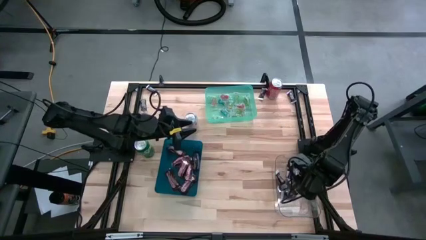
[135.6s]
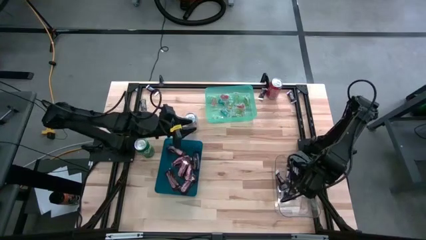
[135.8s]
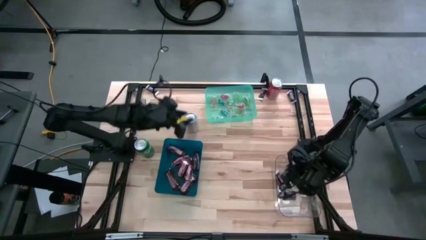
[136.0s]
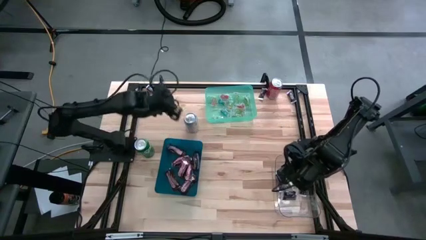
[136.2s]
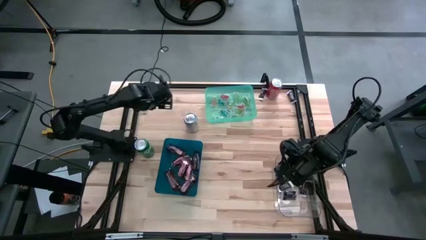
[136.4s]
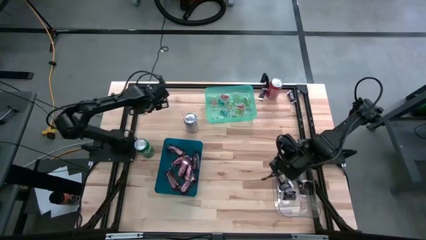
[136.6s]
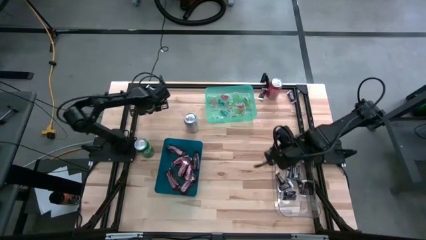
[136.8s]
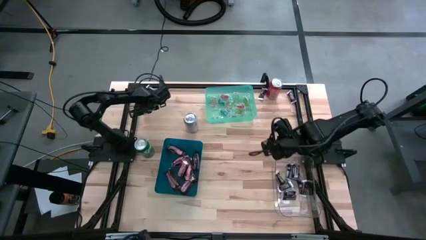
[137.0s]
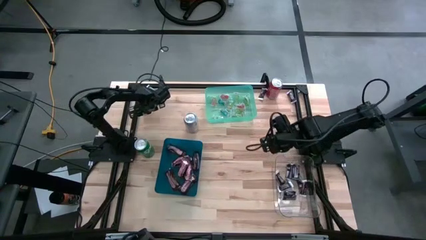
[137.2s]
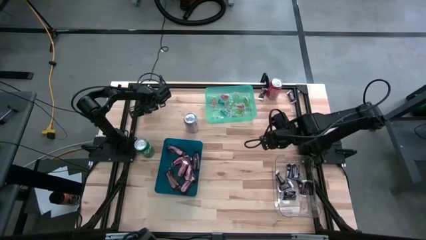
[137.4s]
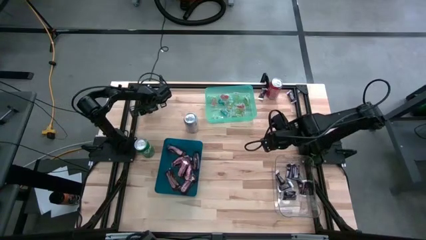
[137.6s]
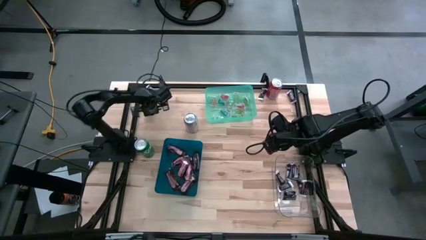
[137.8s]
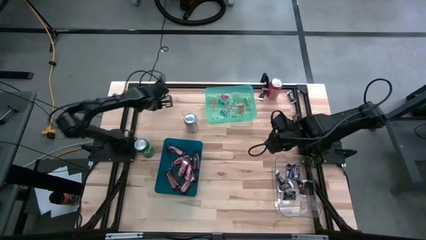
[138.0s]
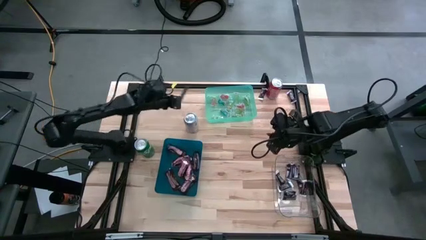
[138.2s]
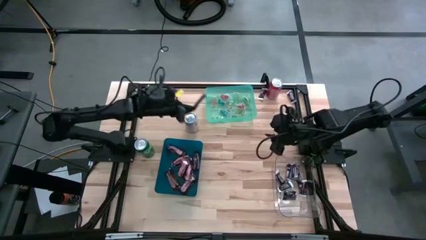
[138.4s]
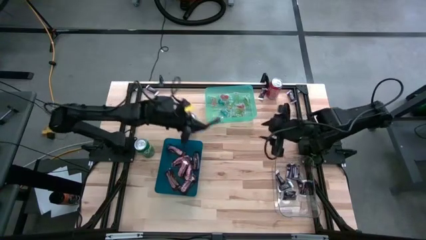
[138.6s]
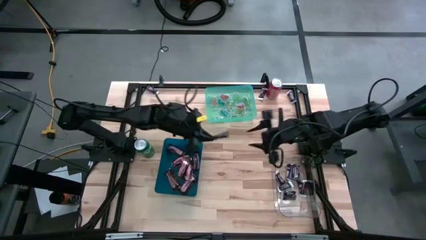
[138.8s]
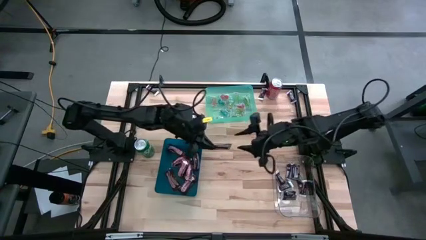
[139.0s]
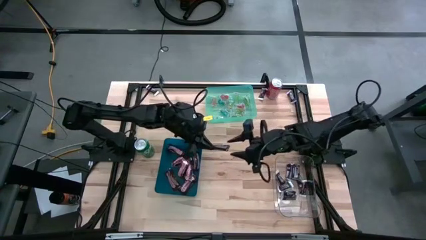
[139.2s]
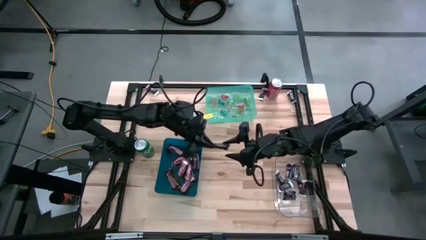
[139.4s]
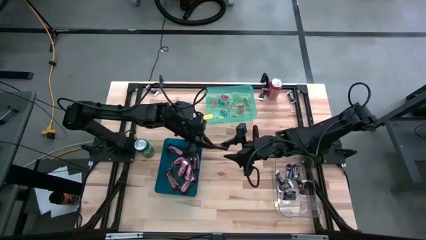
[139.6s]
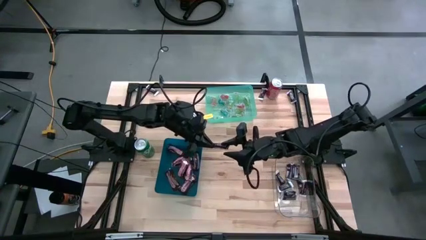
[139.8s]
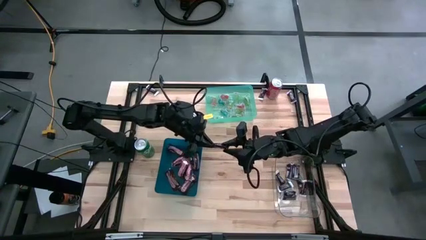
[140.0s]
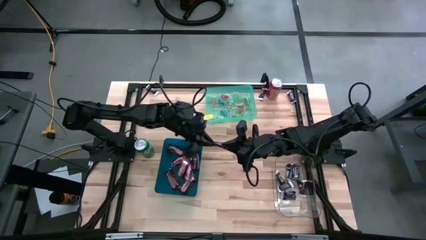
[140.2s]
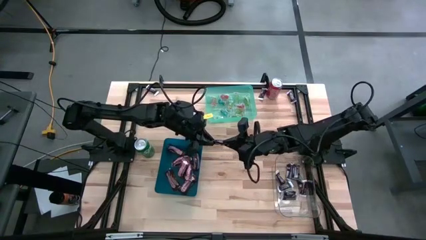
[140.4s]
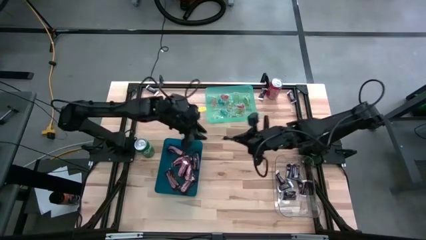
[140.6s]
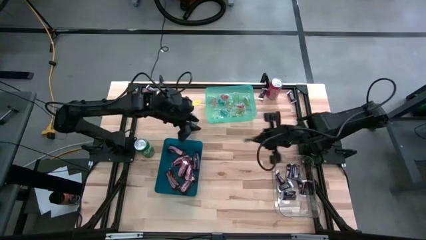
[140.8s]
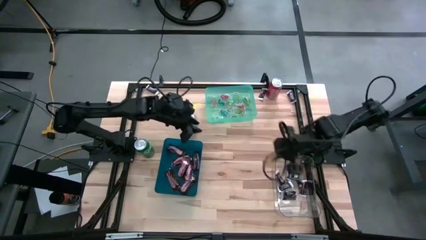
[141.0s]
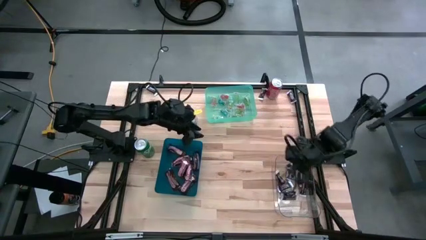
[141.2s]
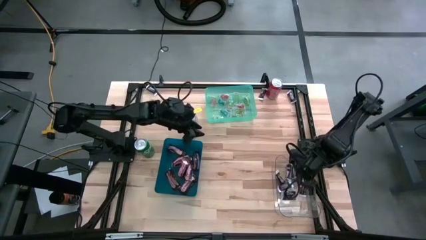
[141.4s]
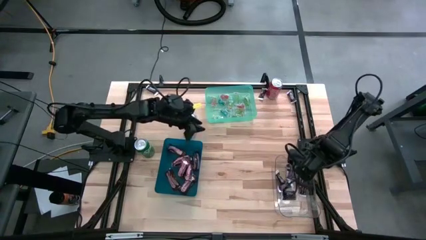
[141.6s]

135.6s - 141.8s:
Task: Organize candy in baskets
Put the dark brown chocolate bar into the transparent bin

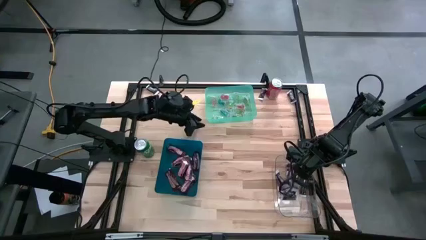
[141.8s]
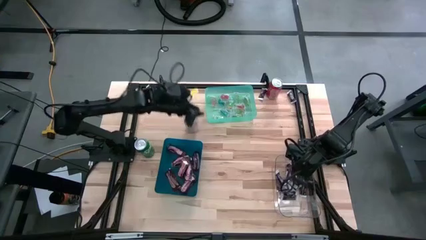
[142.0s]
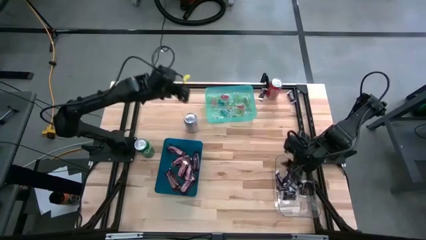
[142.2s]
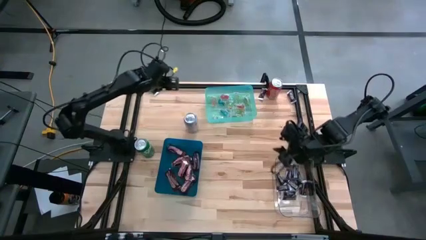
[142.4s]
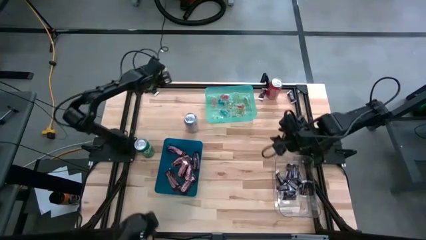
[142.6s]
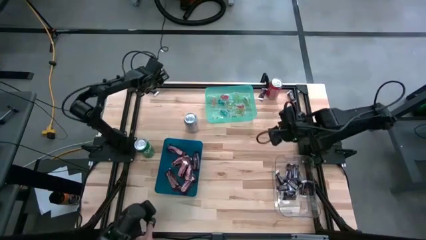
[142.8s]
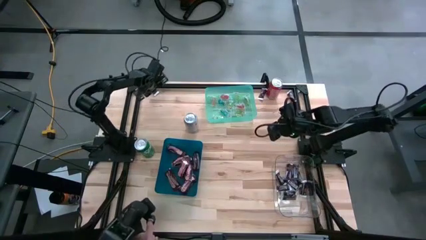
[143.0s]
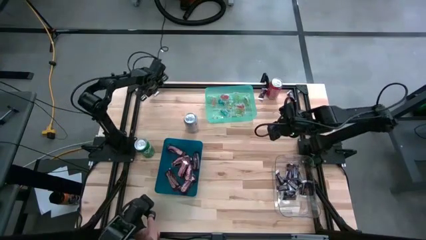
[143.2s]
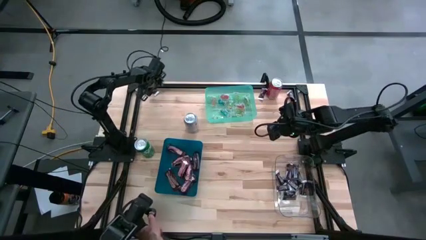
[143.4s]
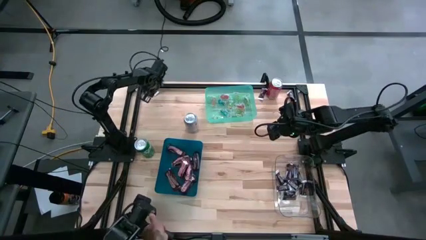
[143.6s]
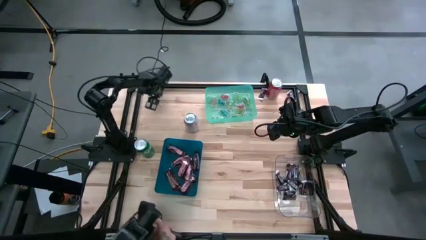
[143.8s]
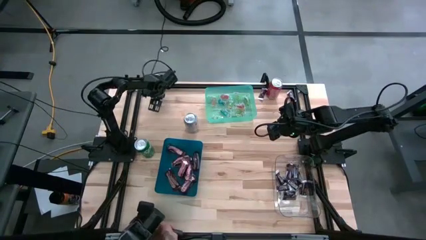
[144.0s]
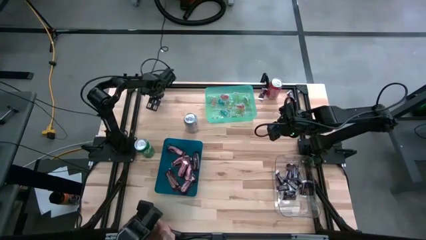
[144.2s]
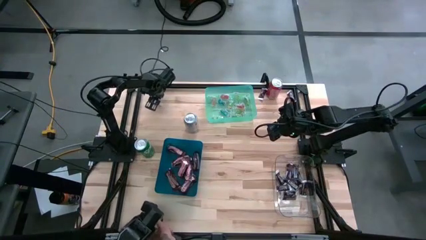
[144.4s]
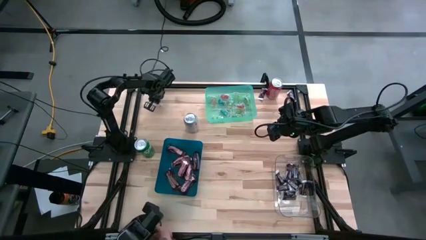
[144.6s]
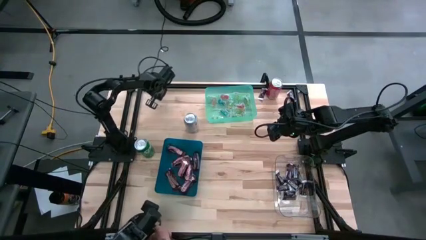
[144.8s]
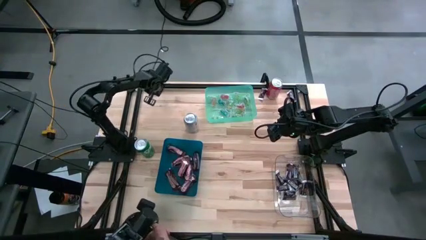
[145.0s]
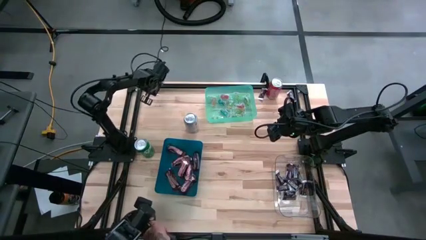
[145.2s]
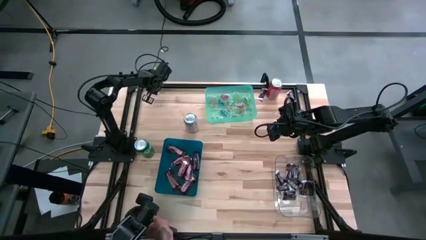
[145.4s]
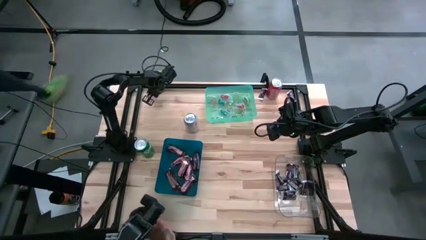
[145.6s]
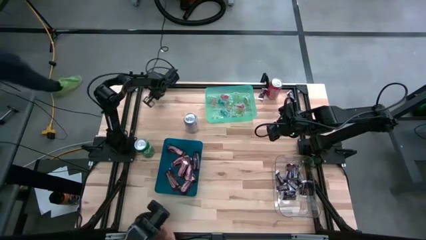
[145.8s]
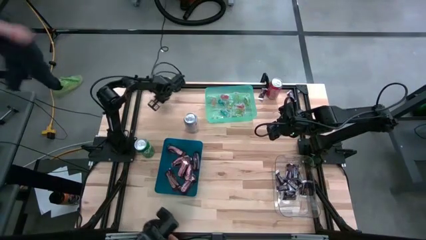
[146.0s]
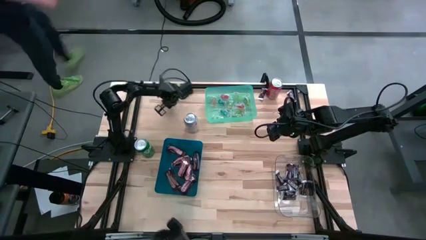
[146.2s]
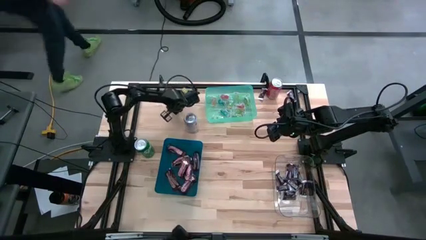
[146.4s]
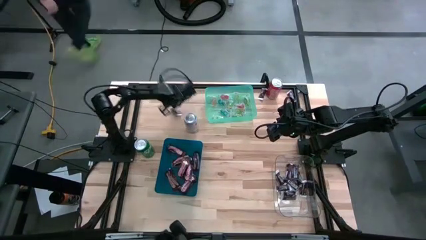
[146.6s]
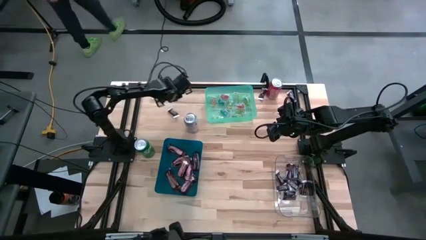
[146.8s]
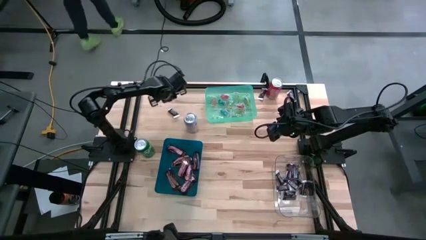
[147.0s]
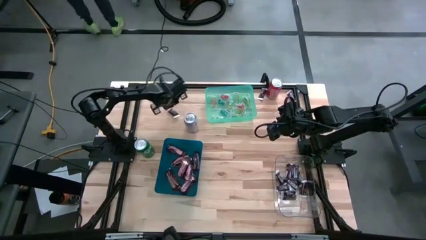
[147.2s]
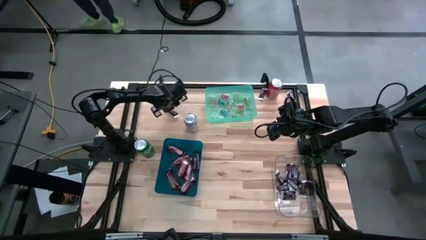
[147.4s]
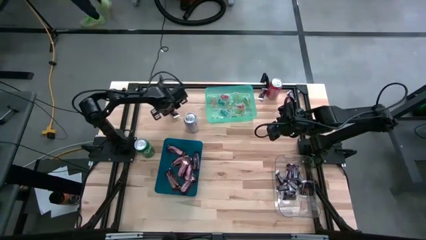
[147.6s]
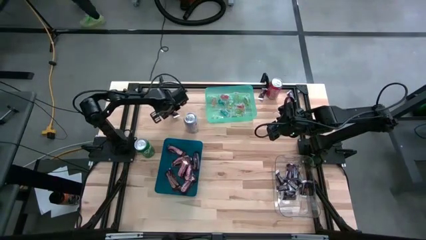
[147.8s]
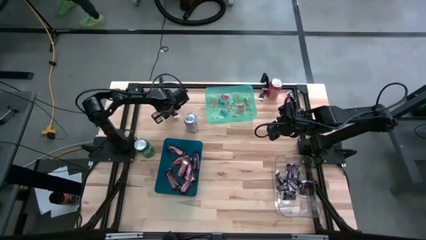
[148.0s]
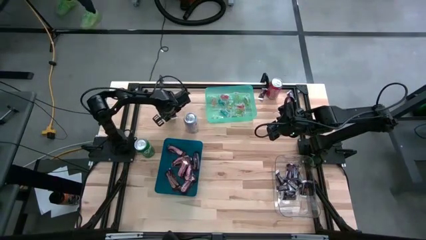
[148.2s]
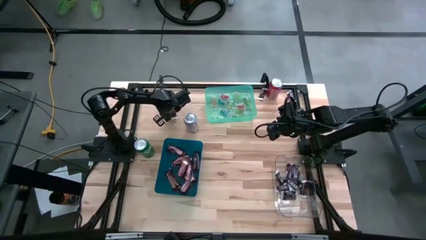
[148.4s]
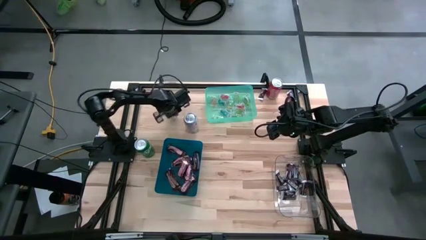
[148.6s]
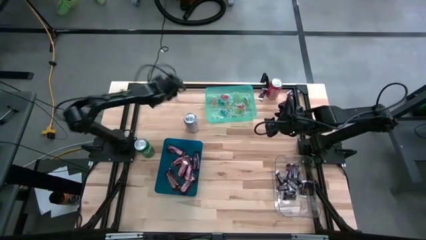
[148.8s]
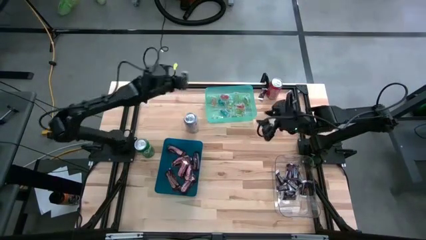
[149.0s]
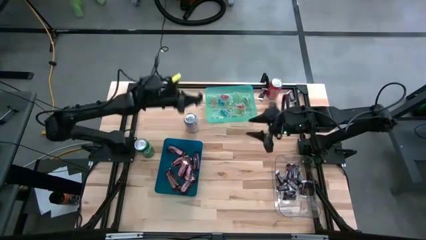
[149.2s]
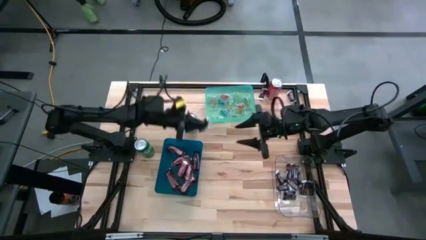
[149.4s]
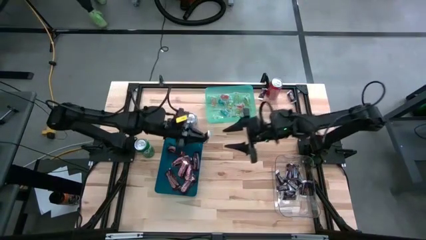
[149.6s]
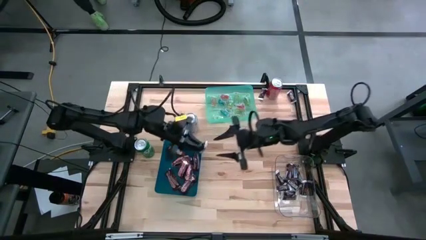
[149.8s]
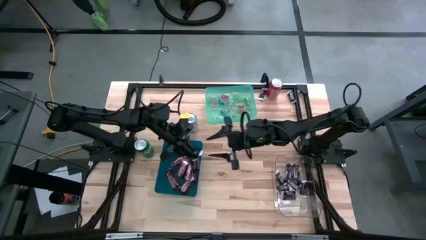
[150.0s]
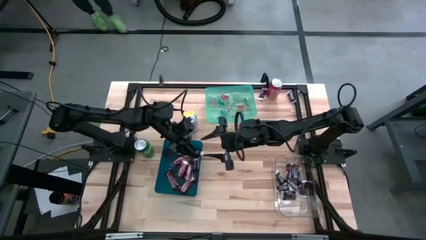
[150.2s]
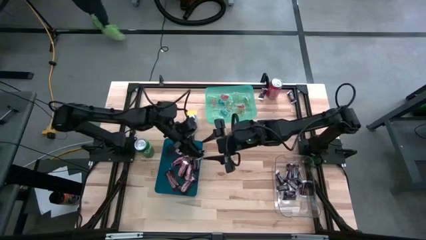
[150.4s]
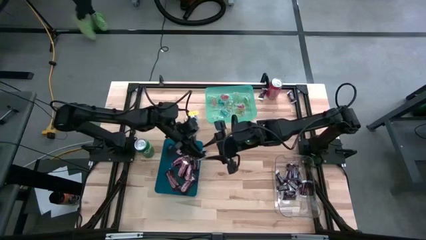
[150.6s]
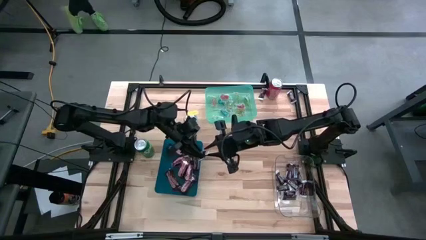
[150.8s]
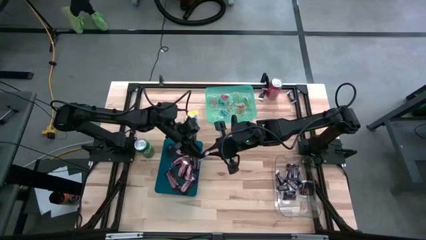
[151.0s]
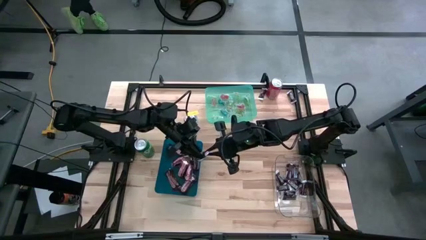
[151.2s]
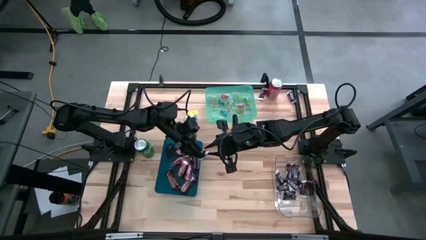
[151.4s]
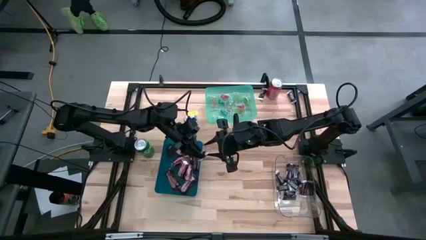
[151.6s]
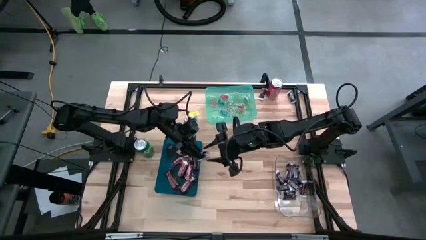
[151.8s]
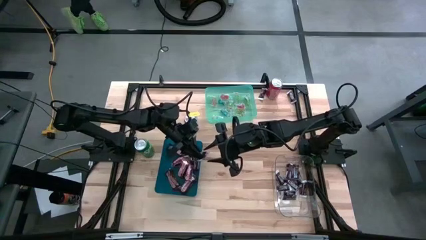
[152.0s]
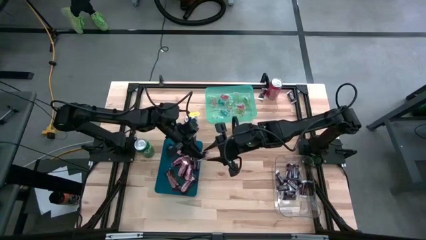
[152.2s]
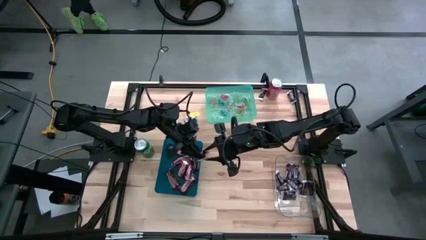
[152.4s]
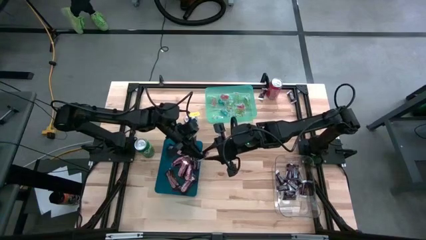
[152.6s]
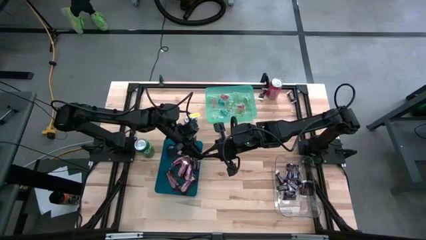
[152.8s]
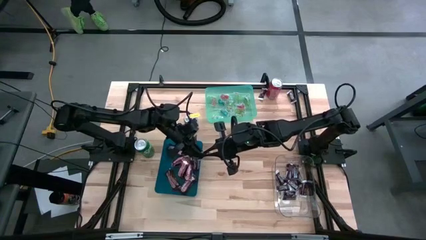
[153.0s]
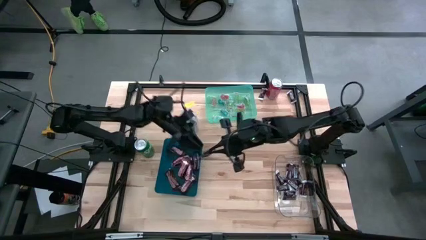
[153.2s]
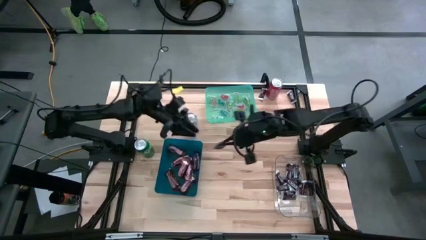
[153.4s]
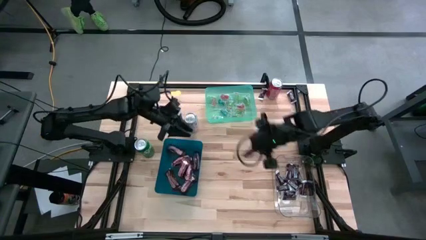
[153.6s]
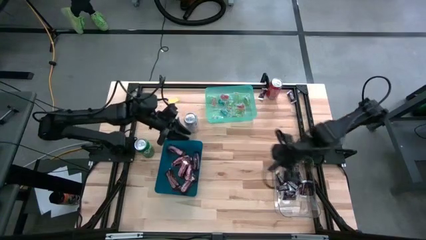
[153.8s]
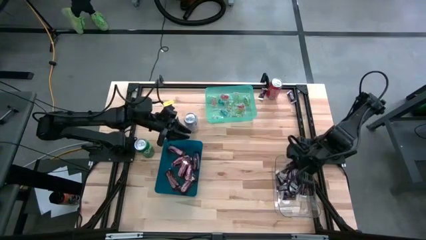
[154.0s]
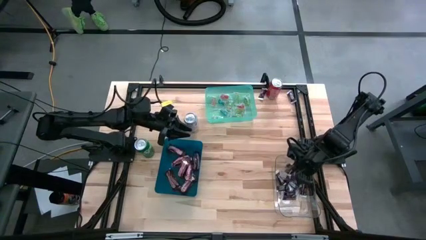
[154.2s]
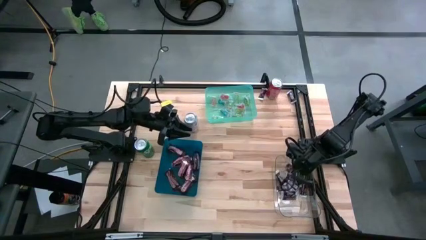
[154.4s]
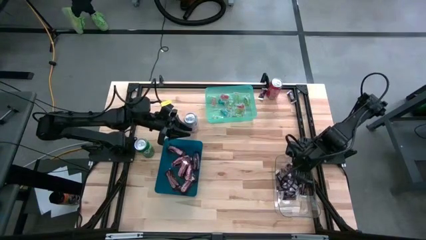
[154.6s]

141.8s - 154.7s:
Put the dark brown chocolate bar into the transparent bin
